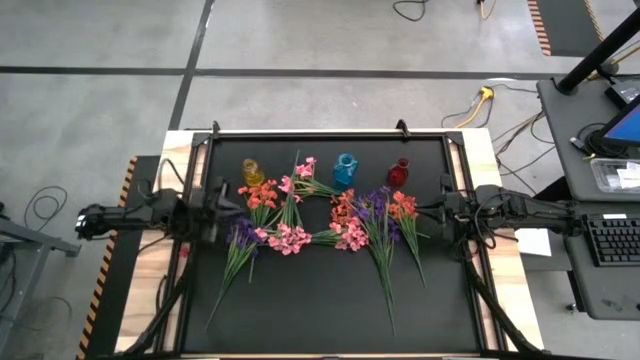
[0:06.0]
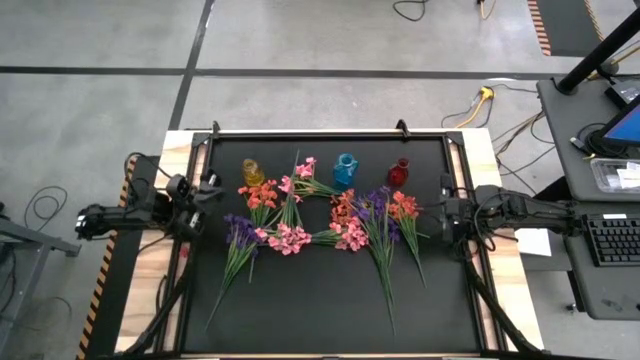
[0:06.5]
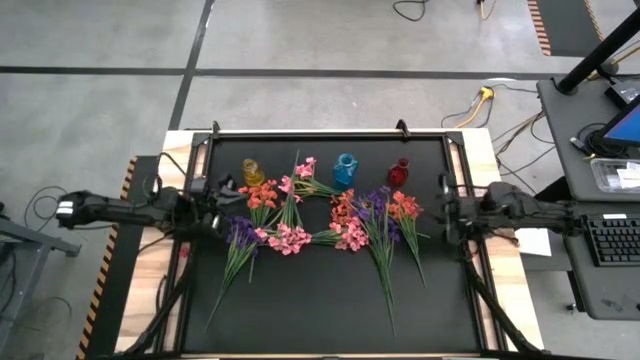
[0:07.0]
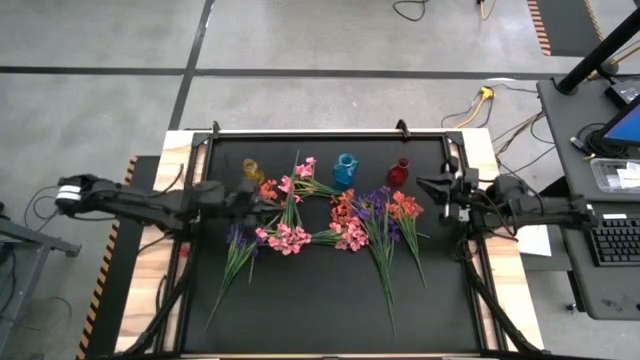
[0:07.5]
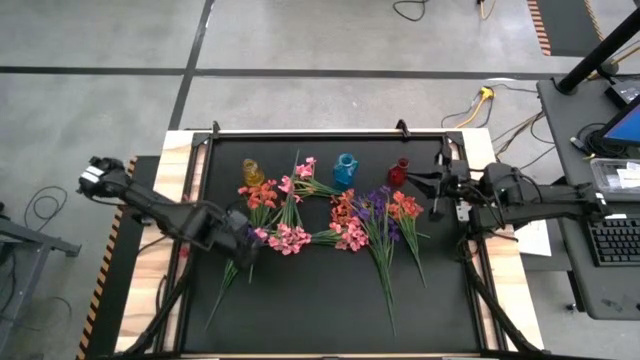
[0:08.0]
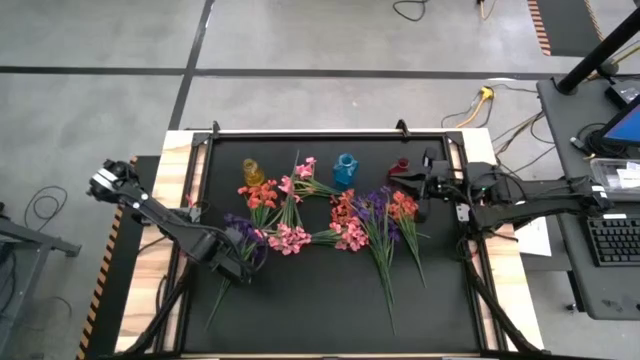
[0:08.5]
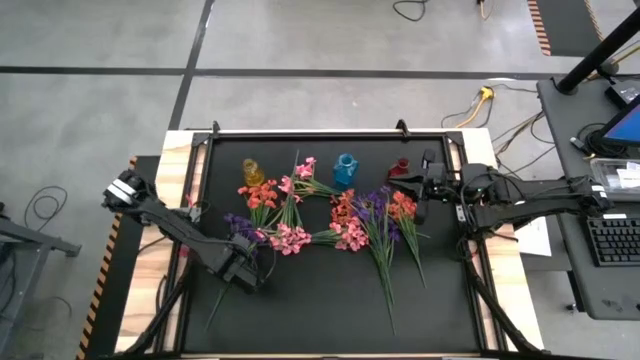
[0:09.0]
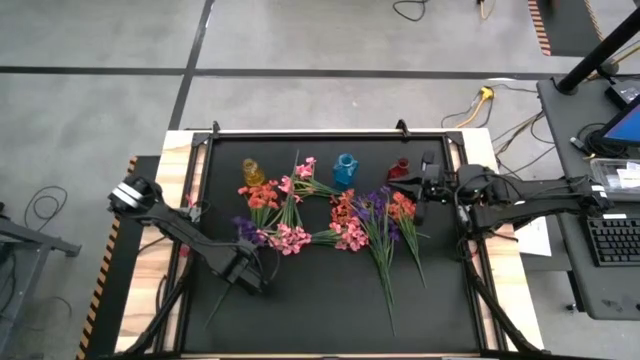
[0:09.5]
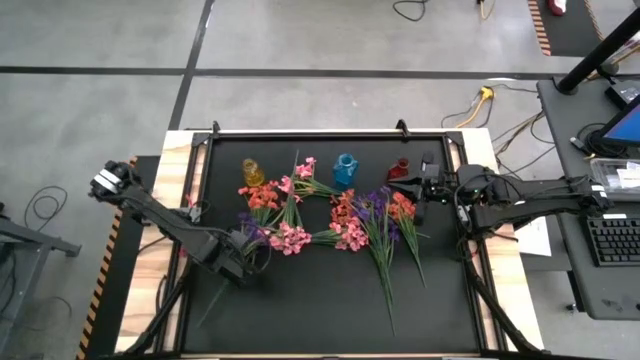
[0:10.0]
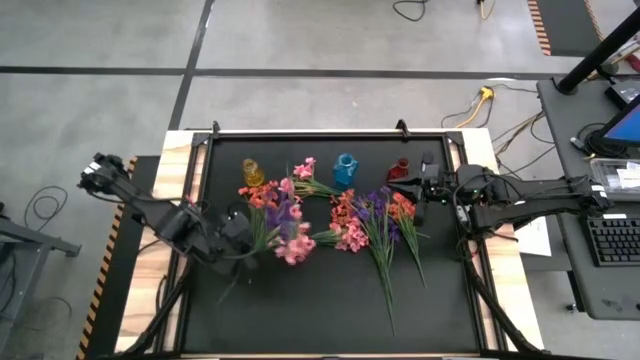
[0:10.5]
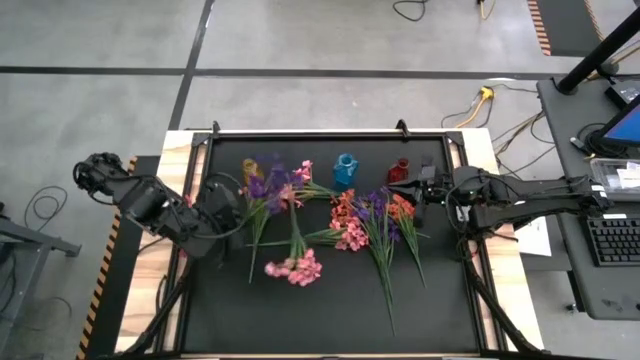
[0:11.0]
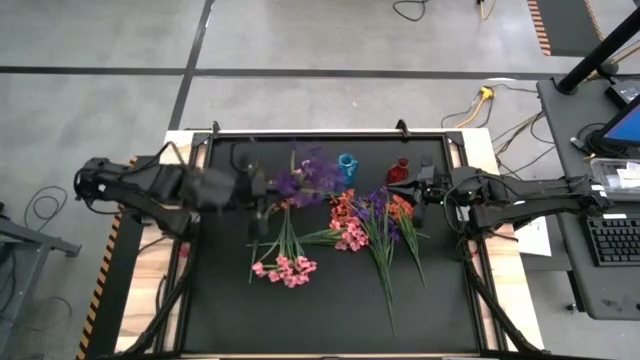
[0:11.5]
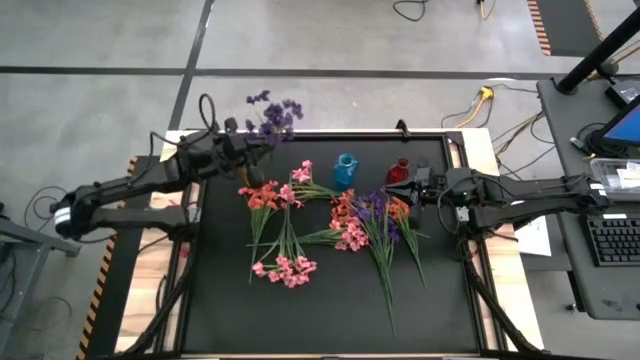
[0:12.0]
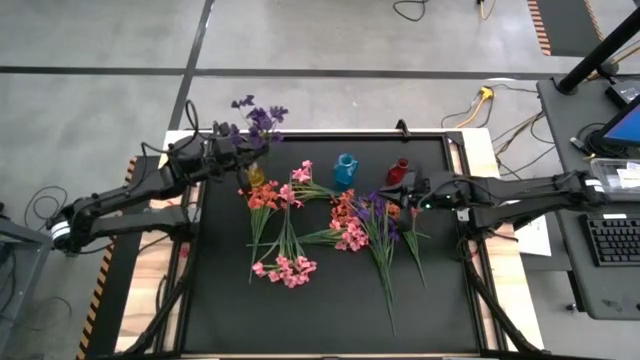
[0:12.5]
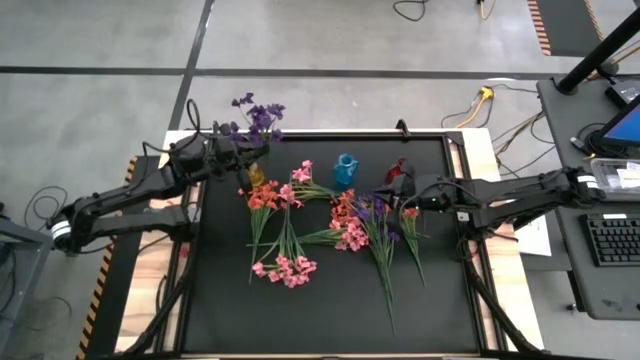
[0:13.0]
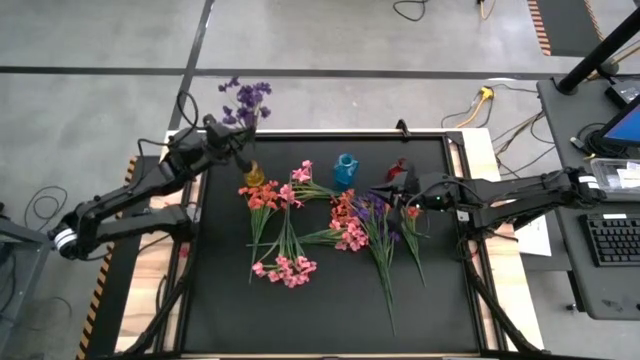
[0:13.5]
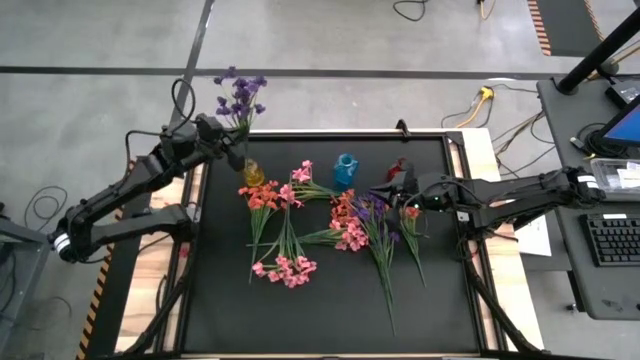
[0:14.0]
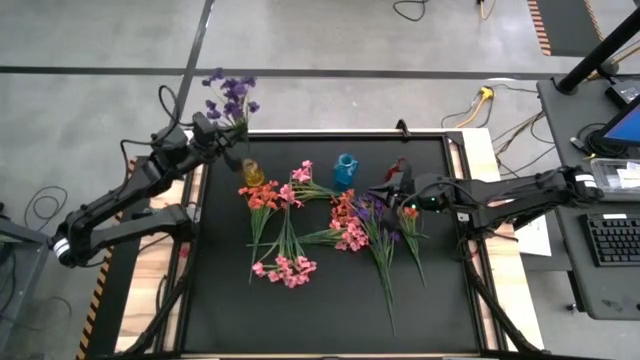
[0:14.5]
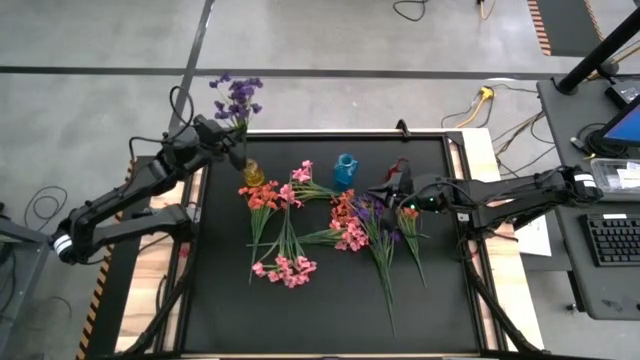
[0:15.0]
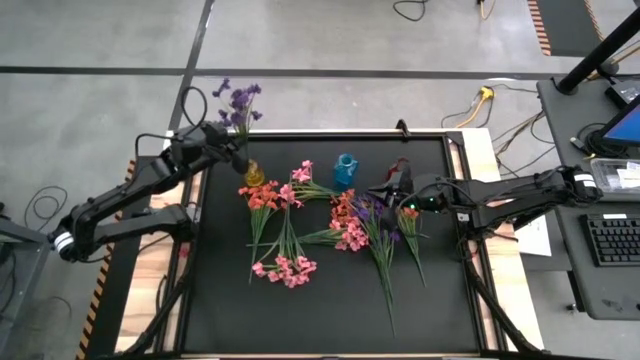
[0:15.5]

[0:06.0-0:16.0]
Task: Sort flowers into vase by color
Put the left purple flower into the yellow vase

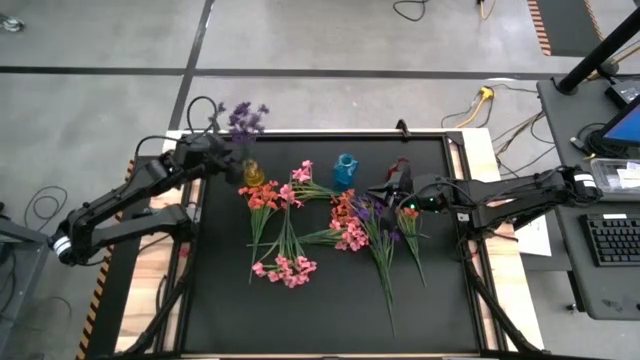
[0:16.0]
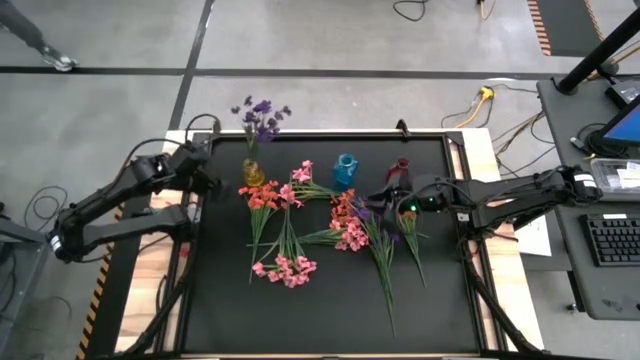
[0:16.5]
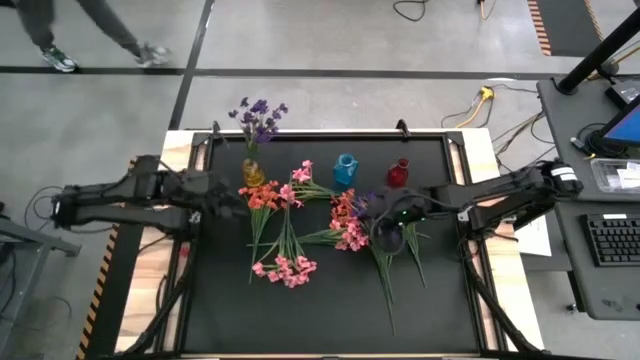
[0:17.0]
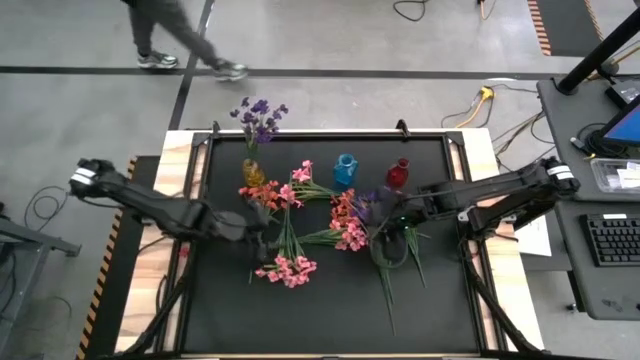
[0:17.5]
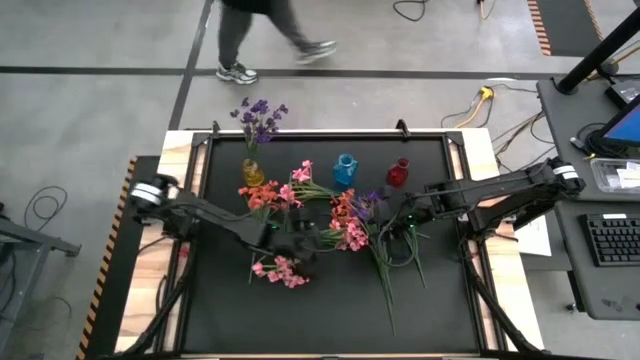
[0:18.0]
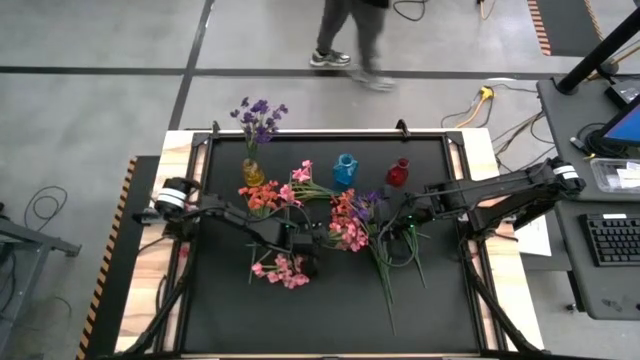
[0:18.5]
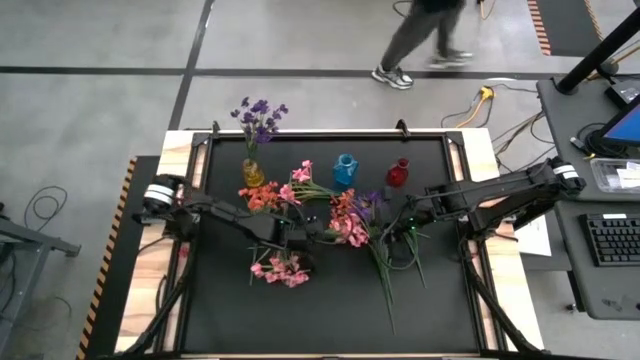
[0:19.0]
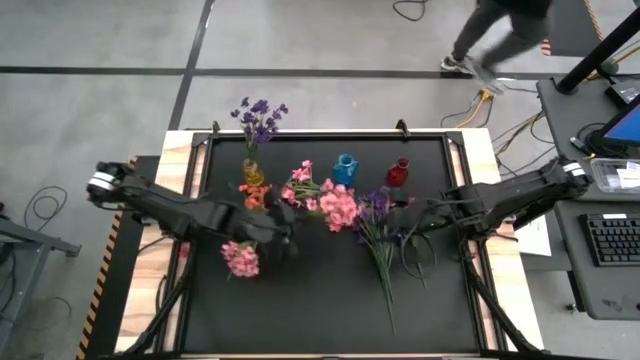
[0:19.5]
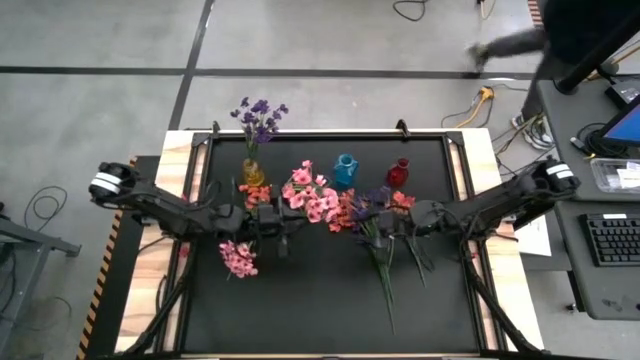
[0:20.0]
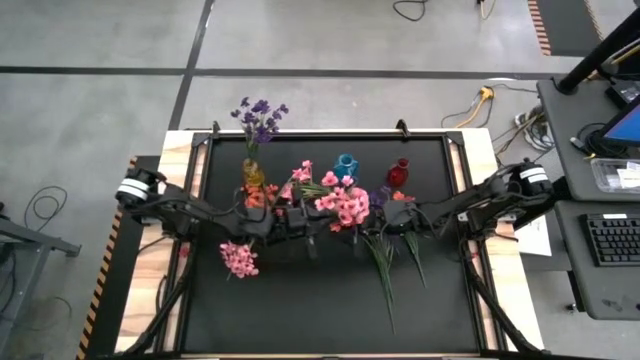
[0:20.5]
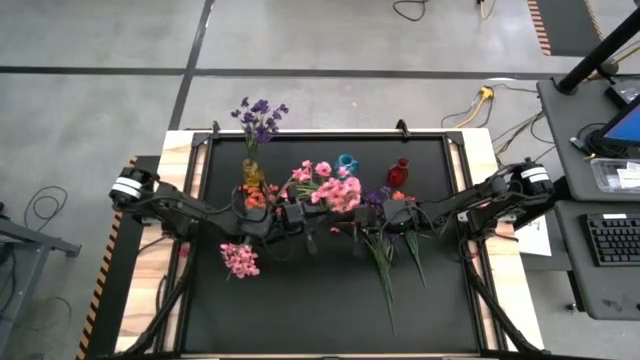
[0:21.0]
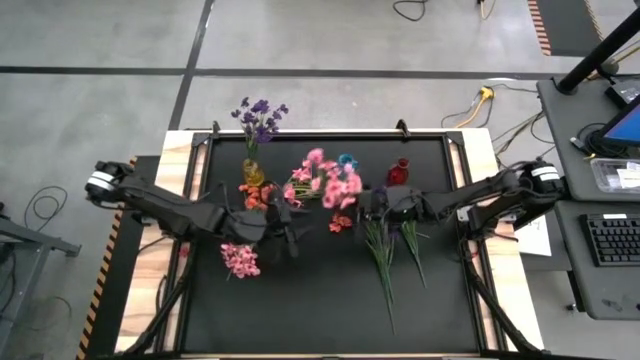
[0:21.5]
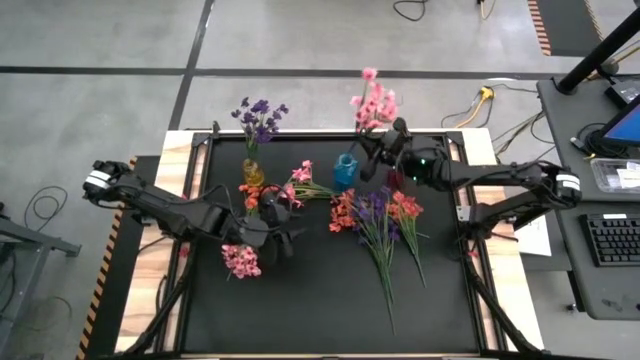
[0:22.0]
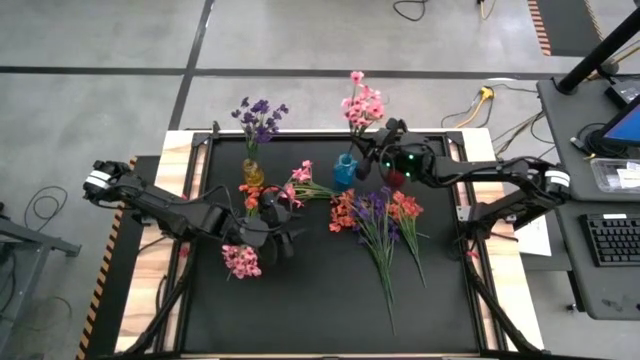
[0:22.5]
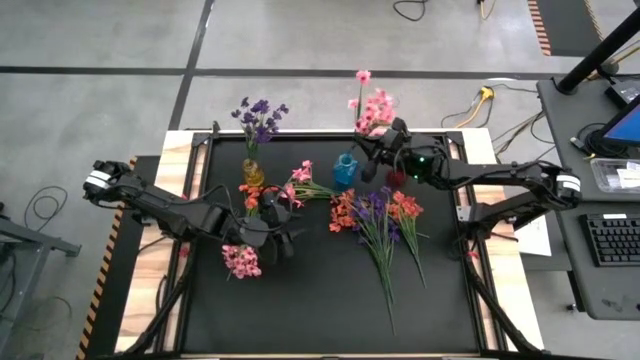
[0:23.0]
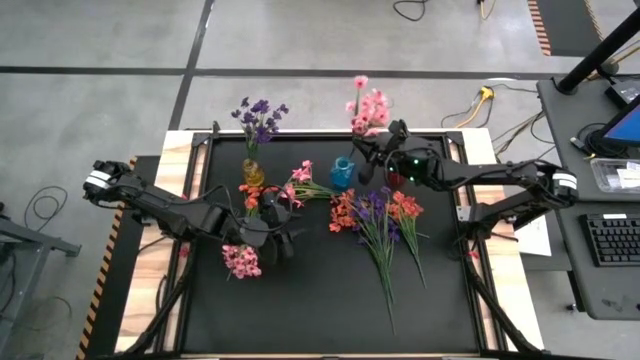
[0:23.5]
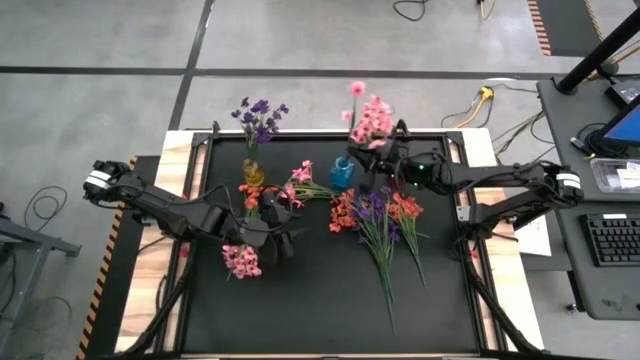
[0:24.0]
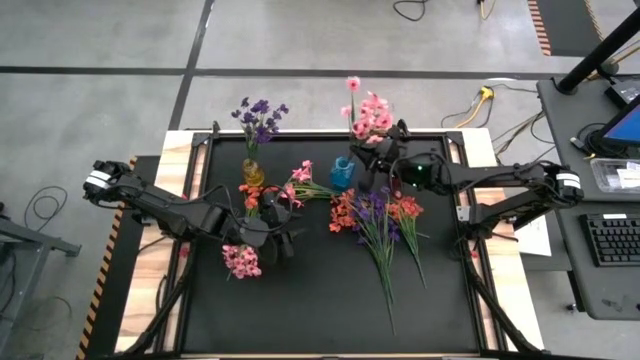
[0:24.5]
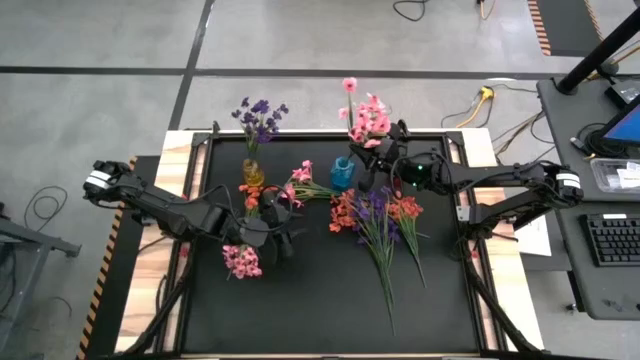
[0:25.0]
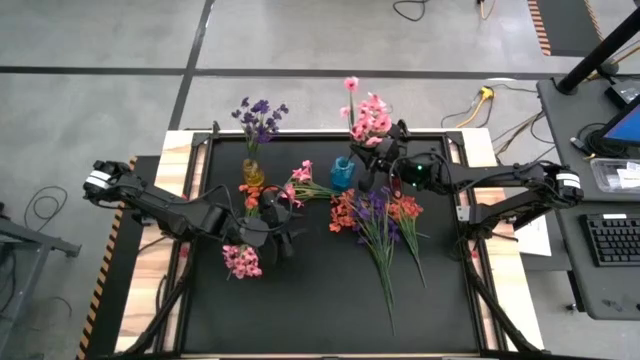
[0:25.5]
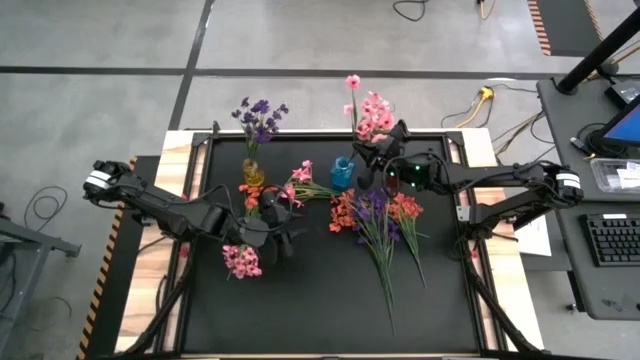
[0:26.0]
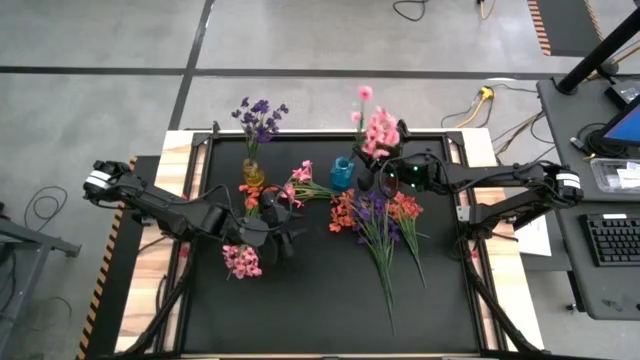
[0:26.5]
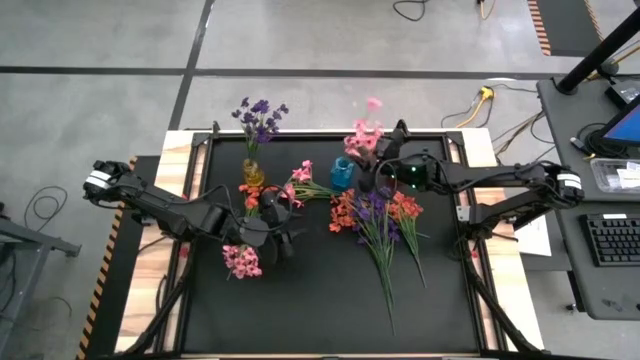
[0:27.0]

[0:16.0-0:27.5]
Put the middle pink flower into the blue vase
